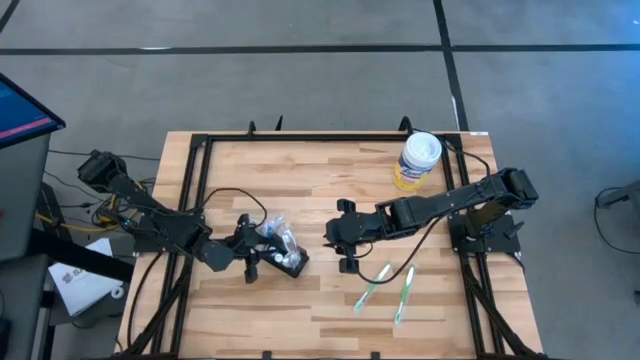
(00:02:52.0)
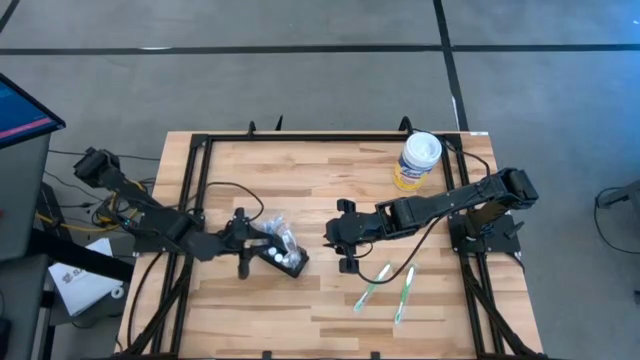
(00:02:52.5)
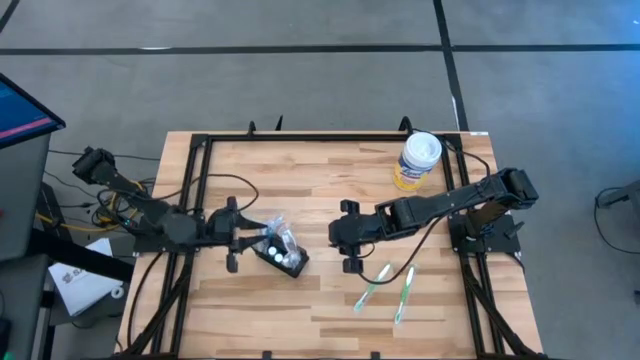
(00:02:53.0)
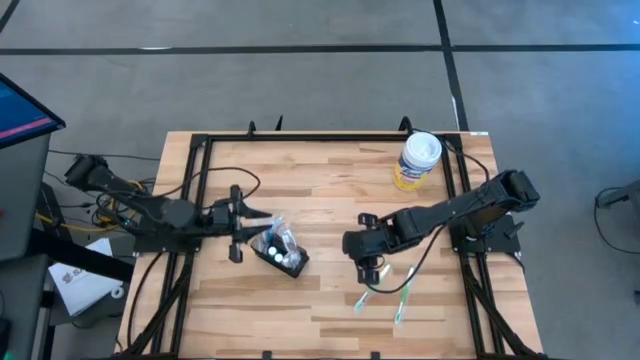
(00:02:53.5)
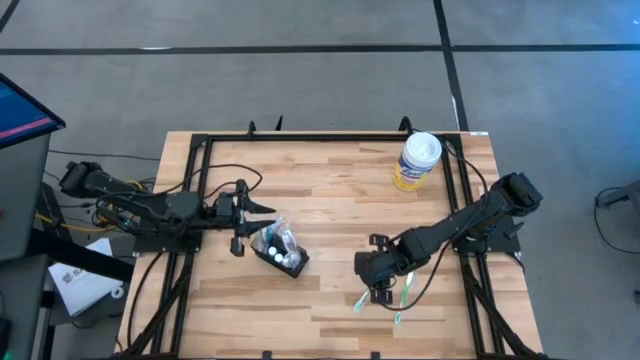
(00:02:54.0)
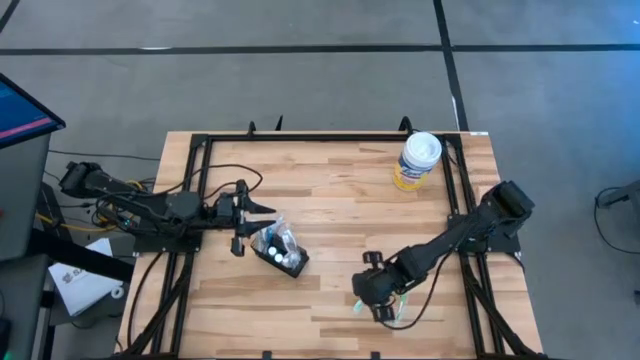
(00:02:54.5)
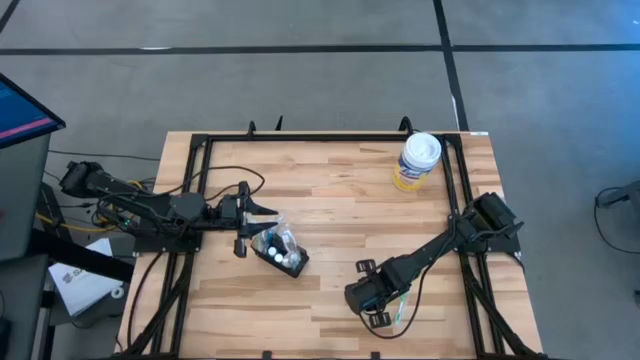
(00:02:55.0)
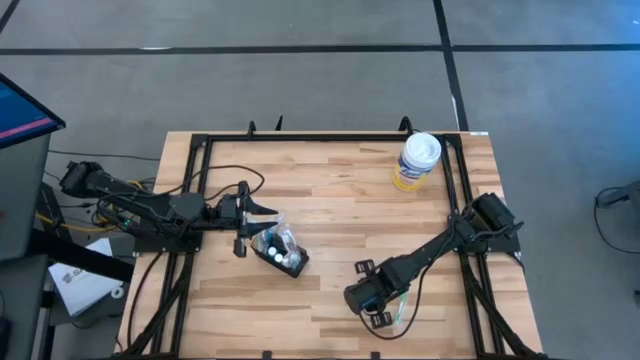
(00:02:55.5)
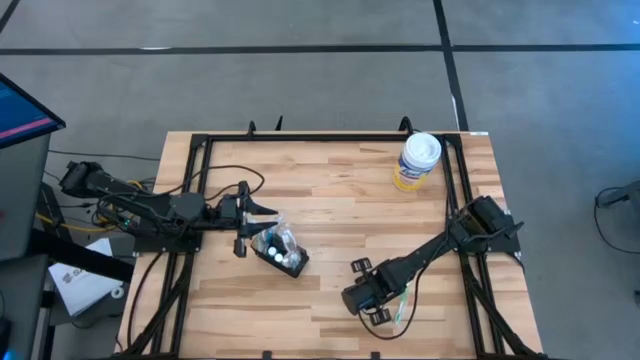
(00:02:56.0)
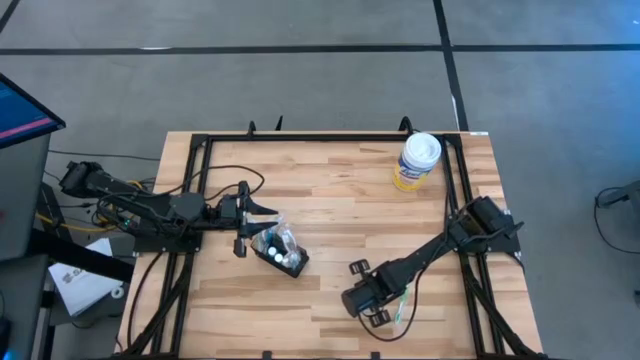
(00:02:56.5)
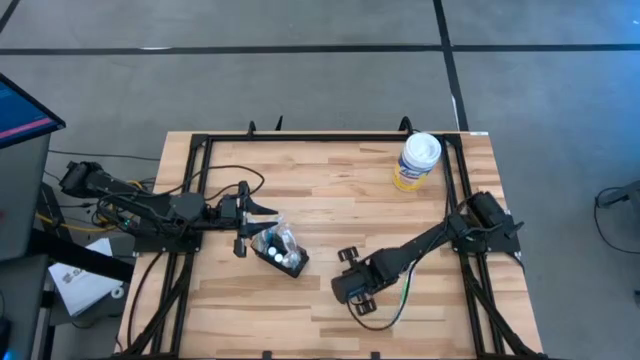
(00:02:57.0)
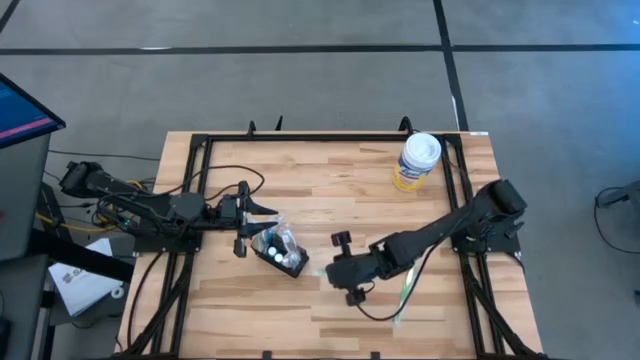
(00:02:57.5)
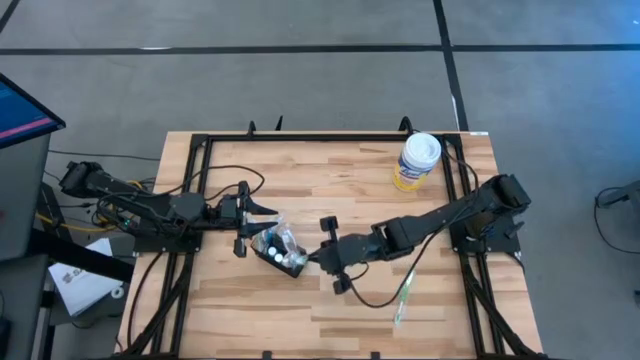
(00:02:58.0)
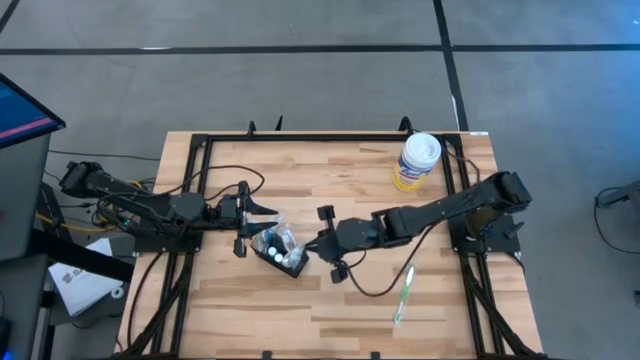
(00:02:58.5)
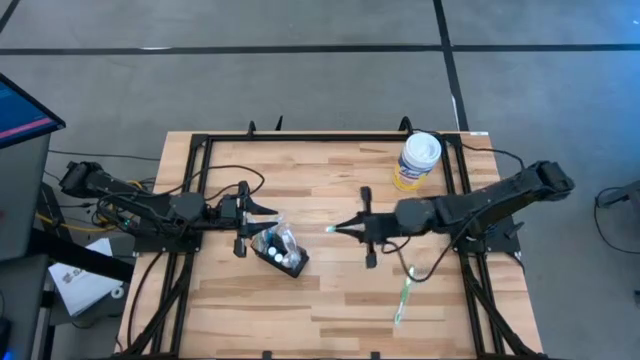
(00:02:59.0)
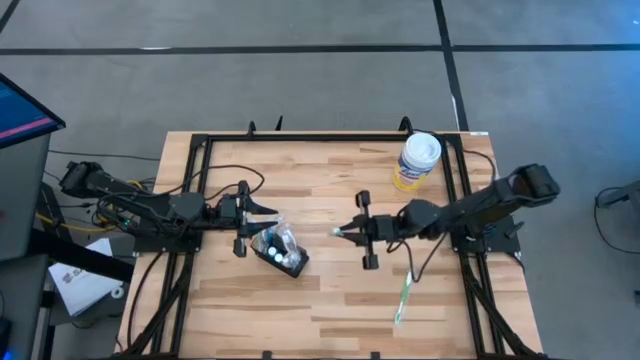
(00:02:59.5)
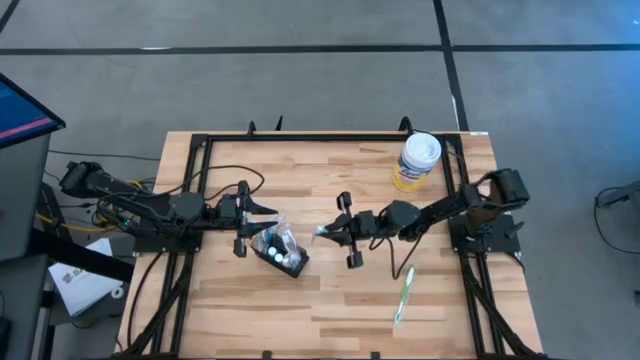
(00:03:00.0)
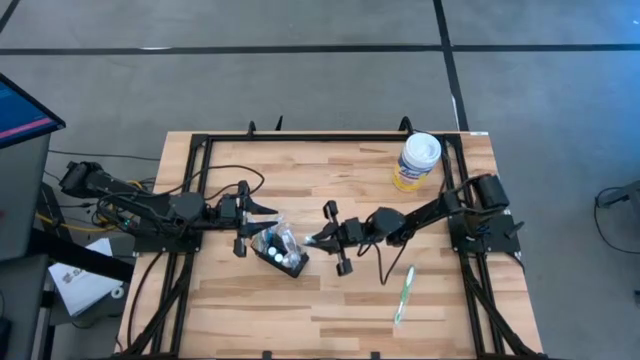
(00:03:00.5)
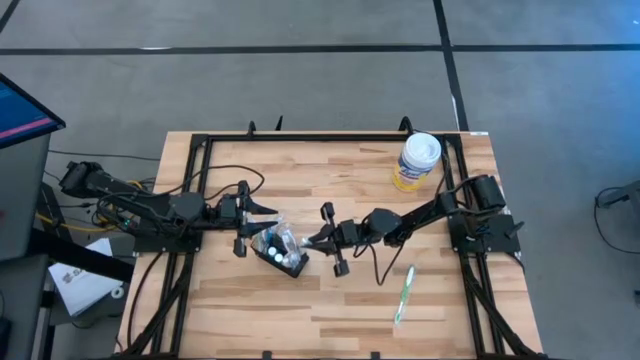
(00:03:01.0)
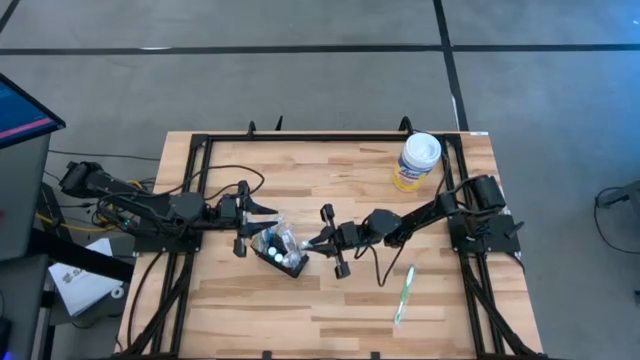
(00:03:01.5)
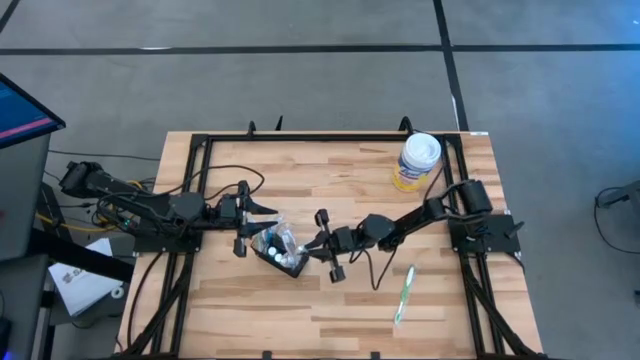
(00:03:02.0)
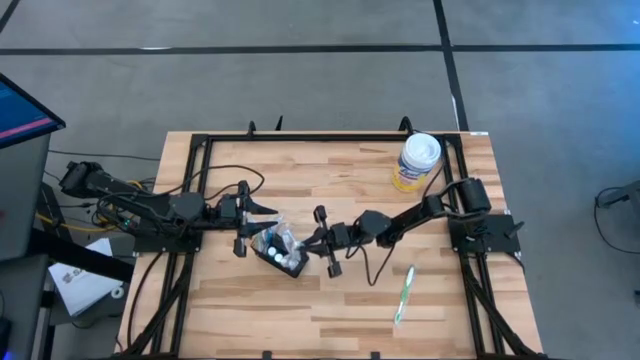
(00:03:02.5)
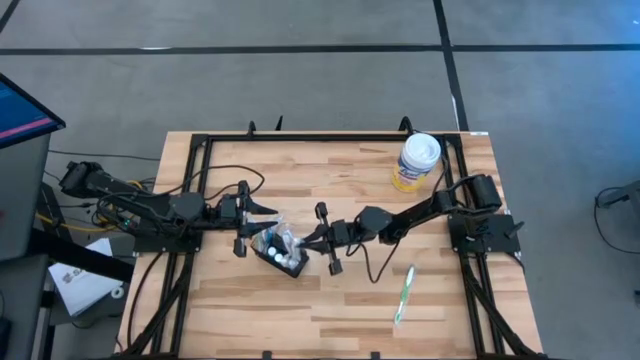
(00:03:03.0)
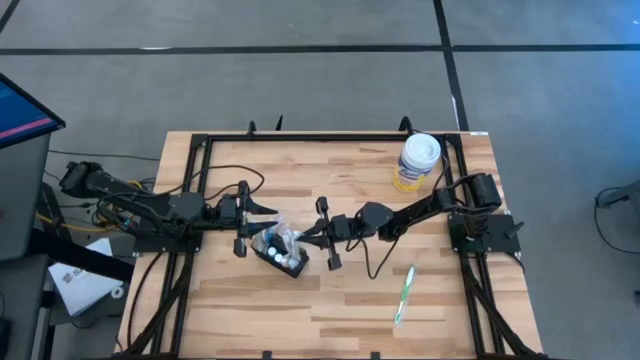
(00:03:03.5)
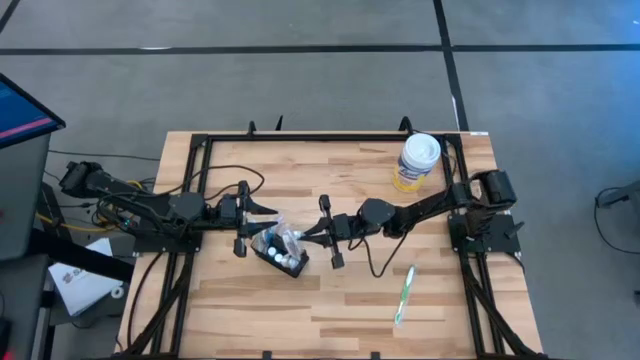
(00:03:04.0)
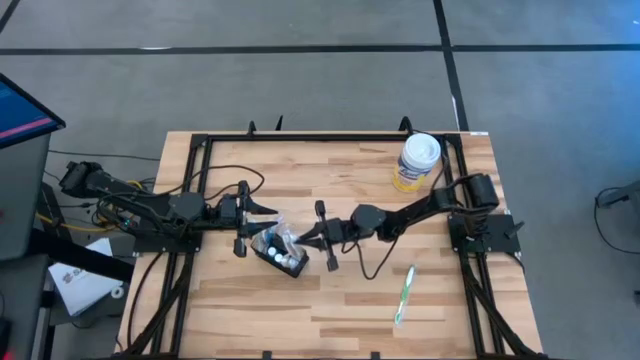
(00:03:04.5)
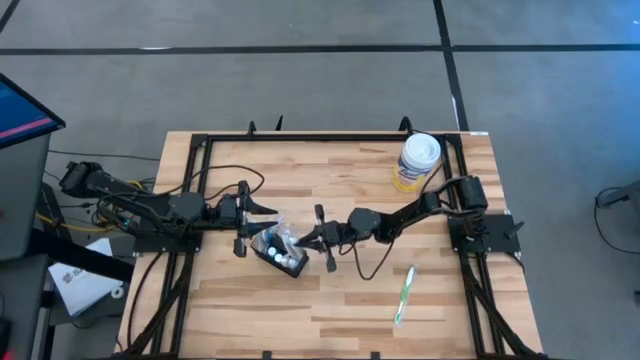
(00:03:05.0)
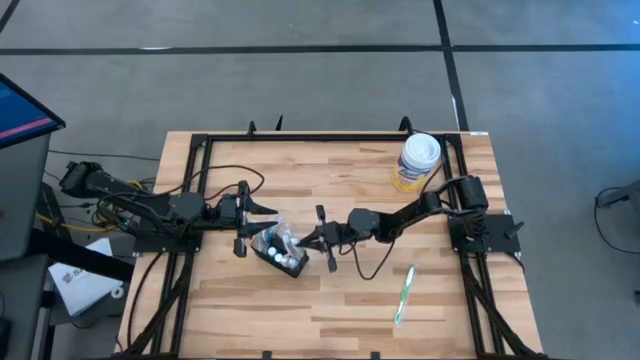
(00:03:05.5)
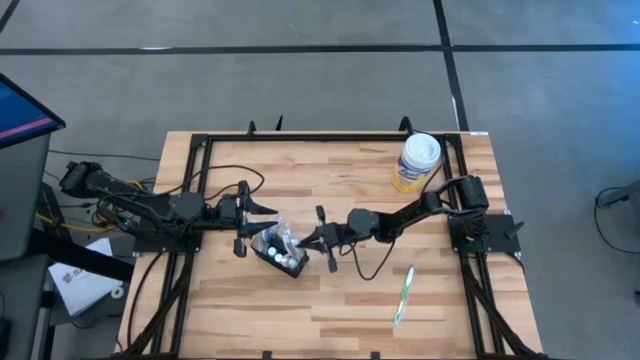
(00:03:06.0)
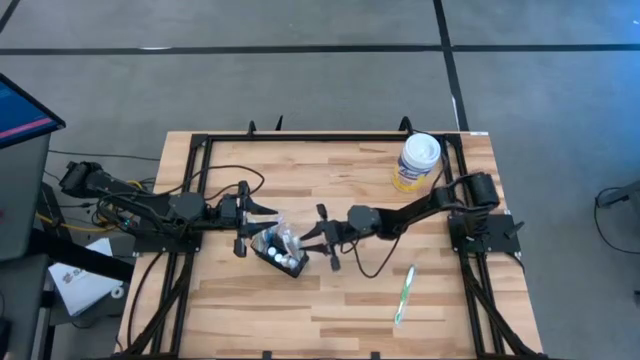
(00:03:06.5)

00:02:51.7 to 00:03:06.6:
Task: Pick & Place toothbrushing station
Put the left green toothbrush into the left compartment of the wire organizer

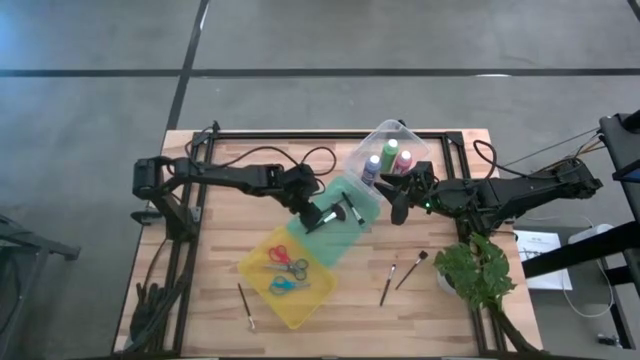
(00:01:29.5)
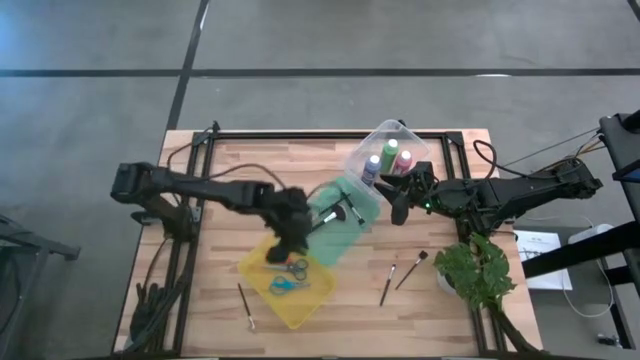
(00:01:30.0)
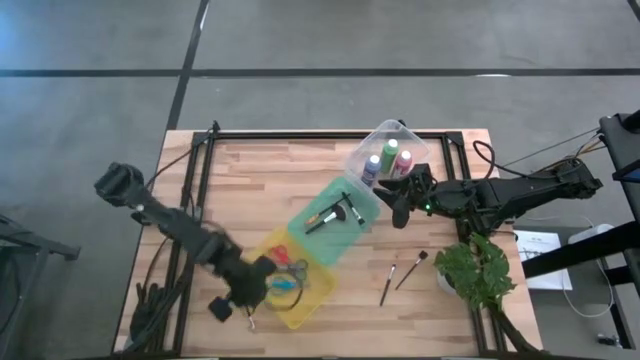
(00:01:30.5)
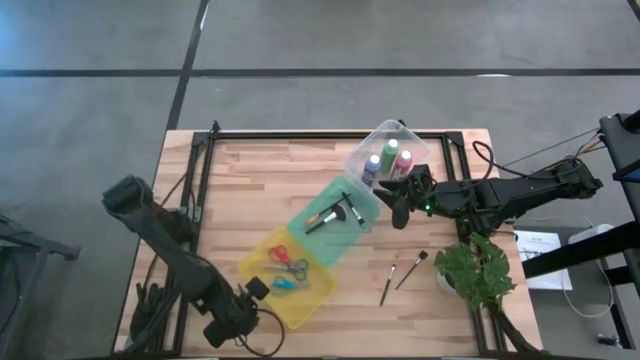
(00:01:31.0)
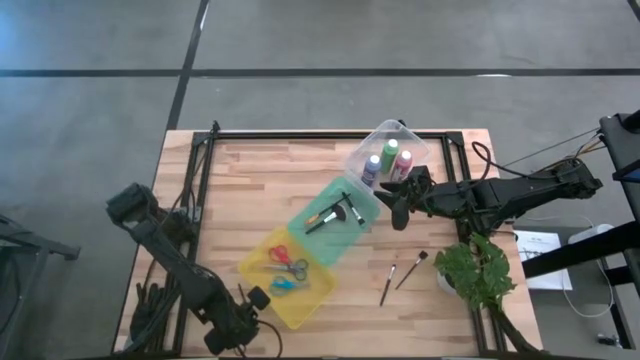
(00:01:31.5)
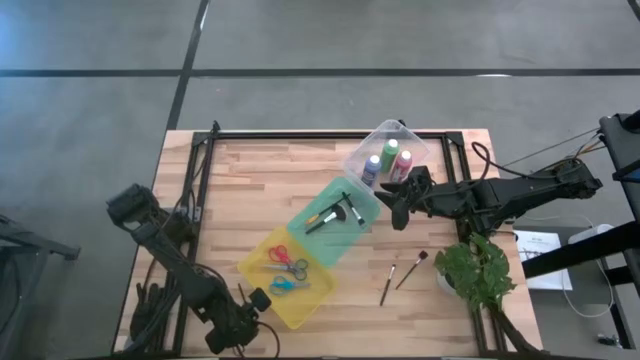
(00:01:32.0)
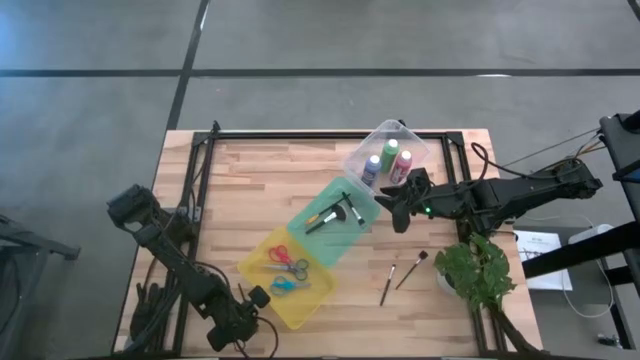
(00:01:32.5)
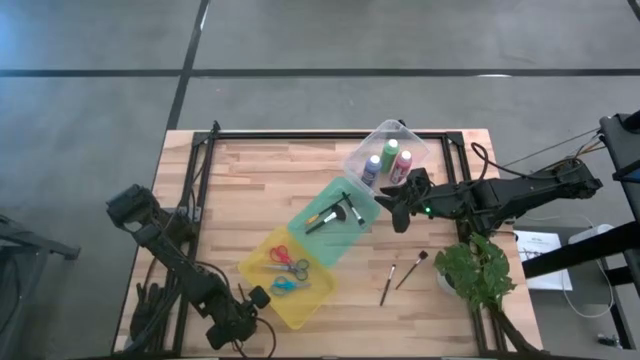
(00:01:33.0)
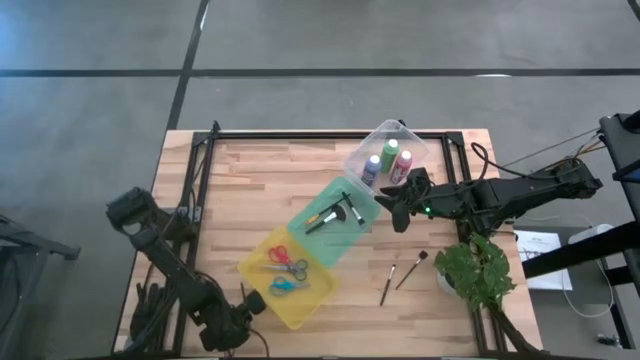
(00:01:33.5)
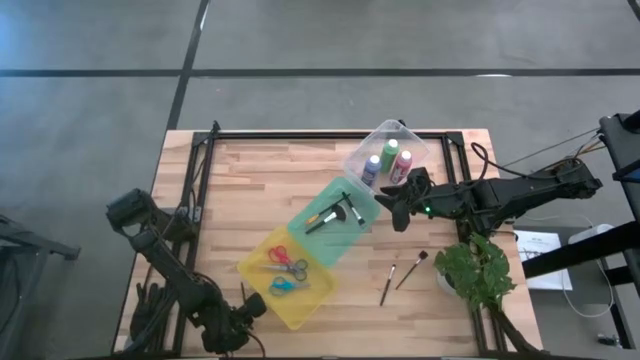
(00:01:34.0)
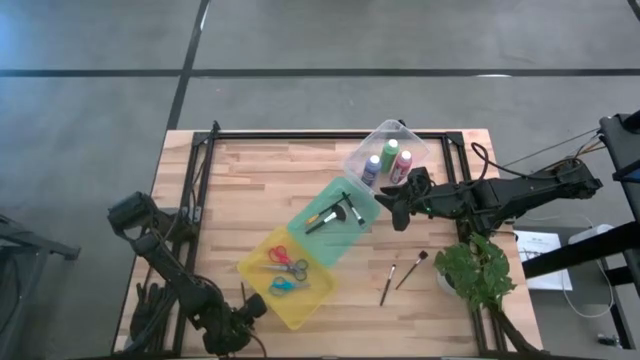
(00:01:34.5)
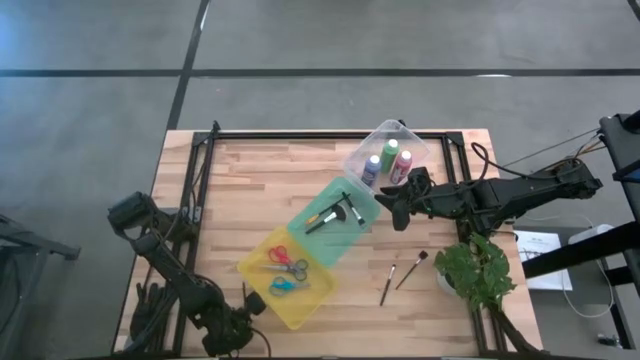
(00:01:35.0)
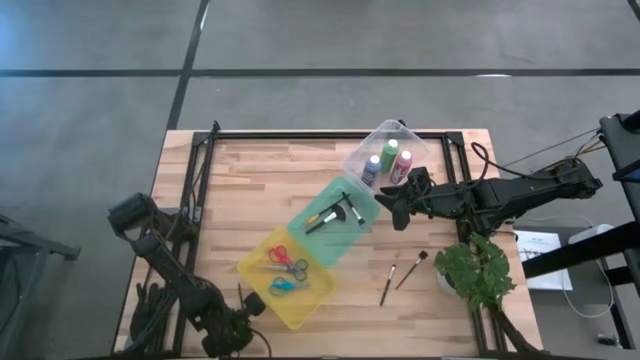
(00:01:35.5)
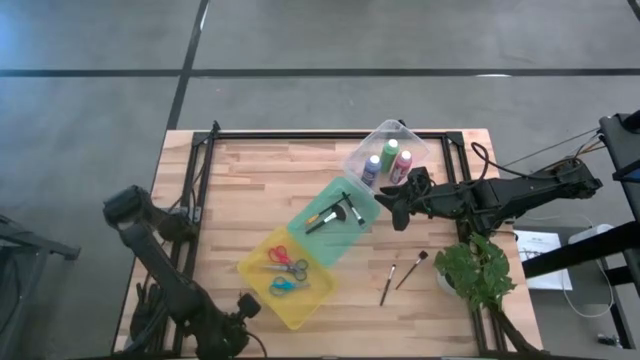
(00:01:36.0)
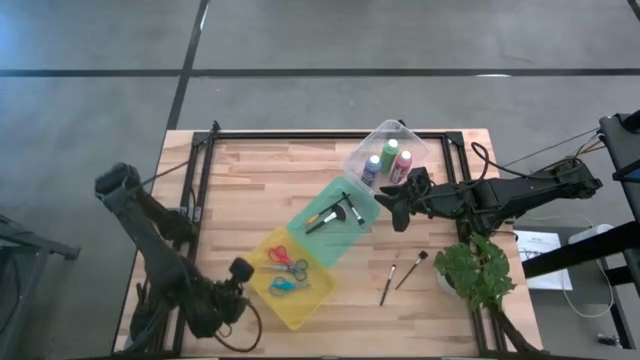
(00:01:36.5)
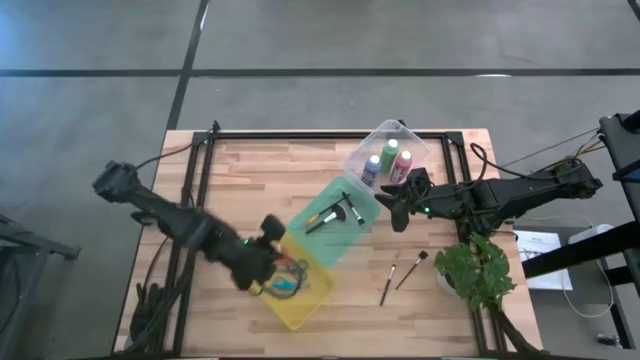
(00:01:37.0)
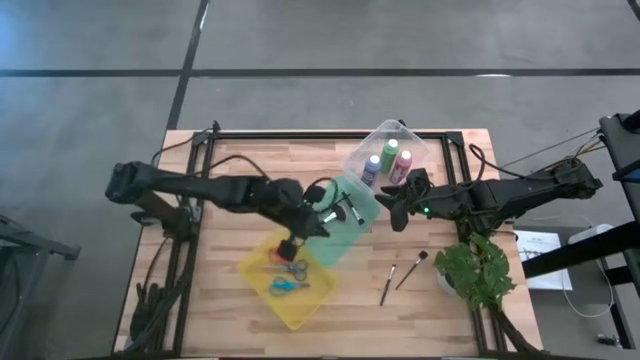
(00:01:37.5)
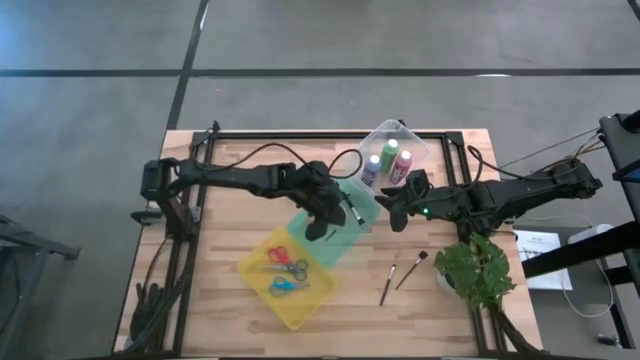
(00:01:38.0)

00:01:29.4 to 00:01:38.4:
Task: Pick & Place Paint Supplies
Put the left black eyeshadow brush into the green bin
